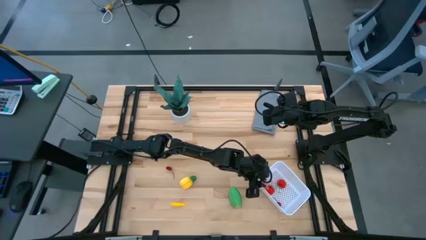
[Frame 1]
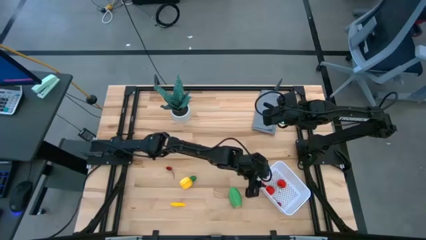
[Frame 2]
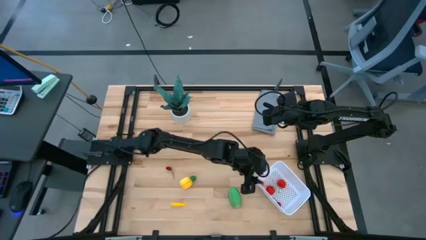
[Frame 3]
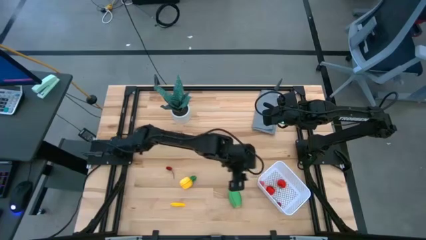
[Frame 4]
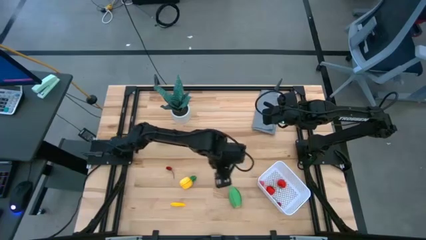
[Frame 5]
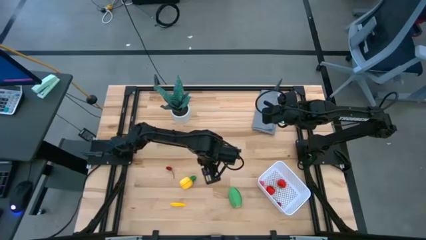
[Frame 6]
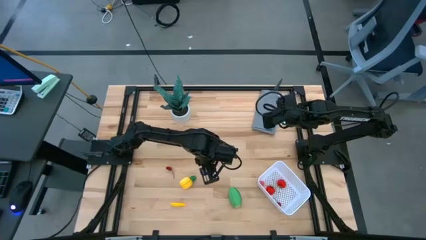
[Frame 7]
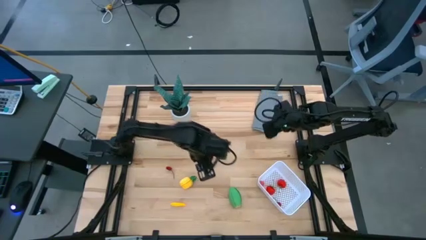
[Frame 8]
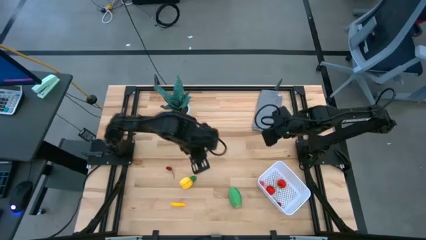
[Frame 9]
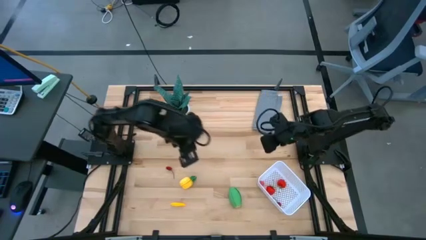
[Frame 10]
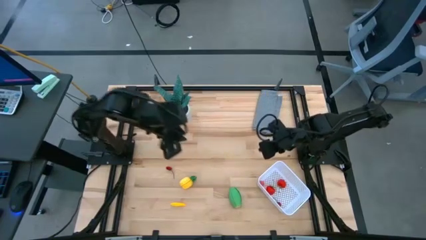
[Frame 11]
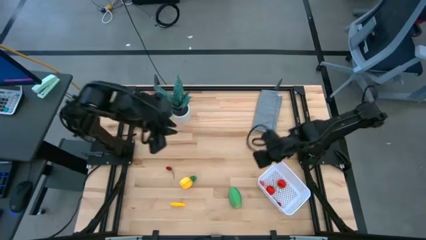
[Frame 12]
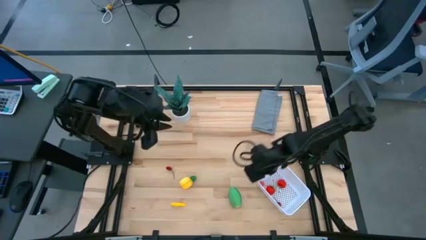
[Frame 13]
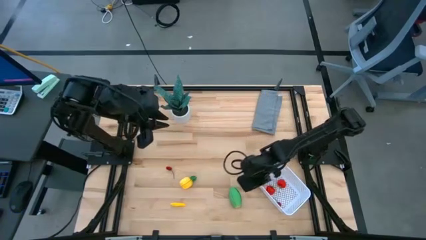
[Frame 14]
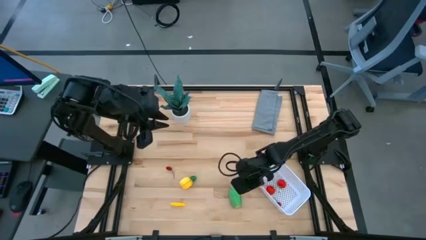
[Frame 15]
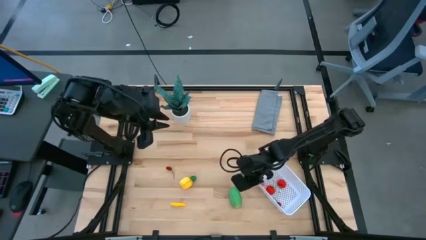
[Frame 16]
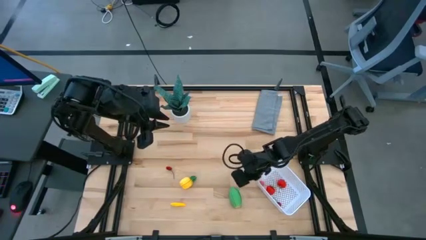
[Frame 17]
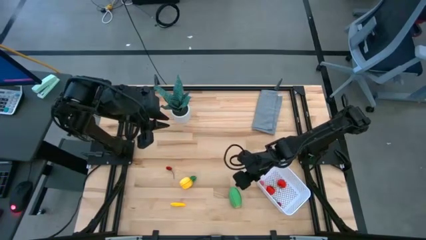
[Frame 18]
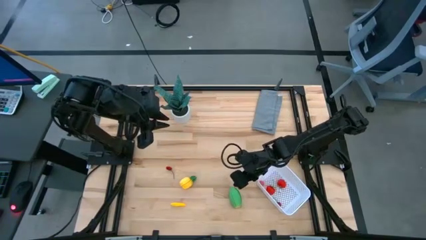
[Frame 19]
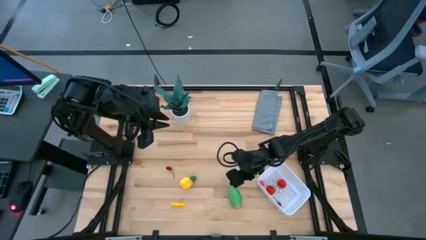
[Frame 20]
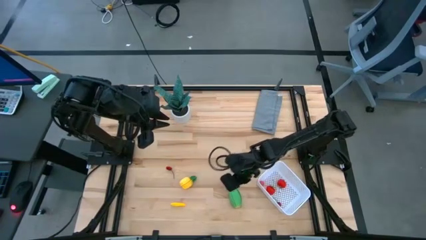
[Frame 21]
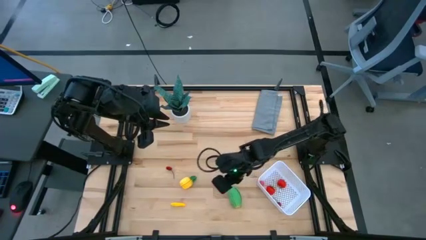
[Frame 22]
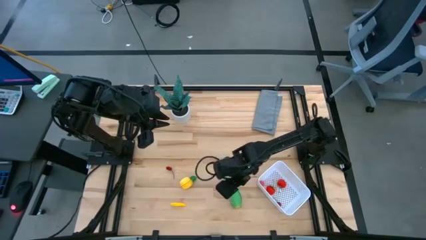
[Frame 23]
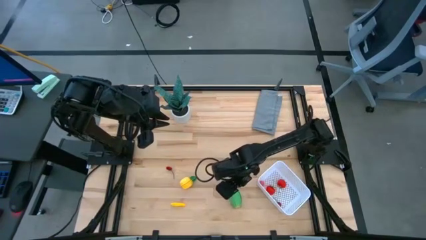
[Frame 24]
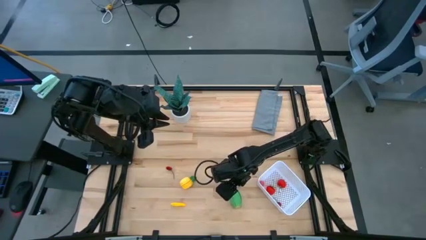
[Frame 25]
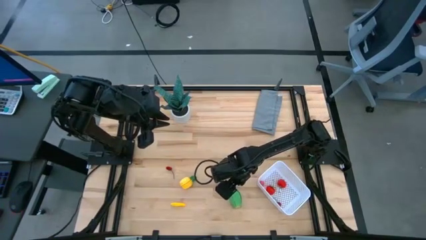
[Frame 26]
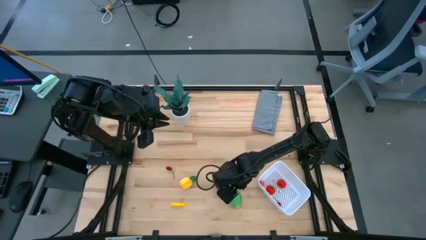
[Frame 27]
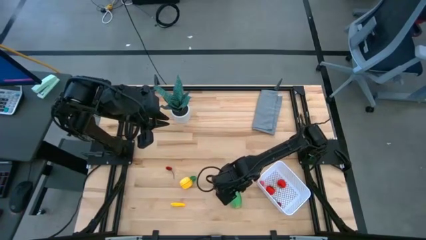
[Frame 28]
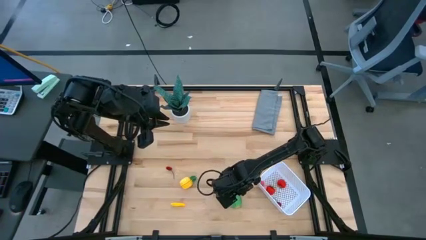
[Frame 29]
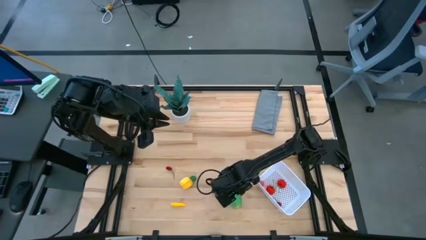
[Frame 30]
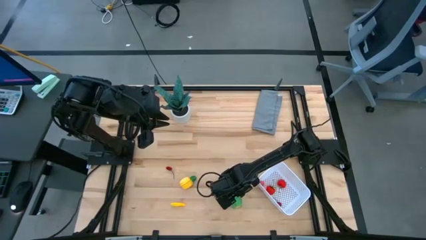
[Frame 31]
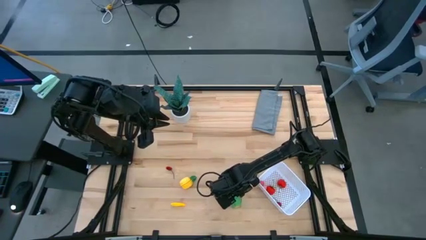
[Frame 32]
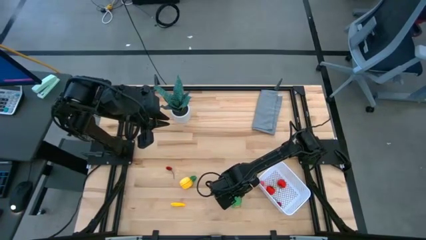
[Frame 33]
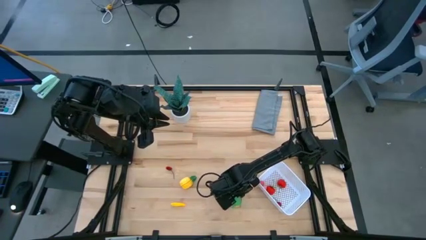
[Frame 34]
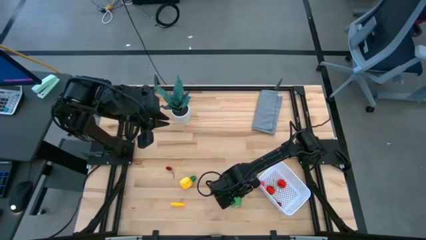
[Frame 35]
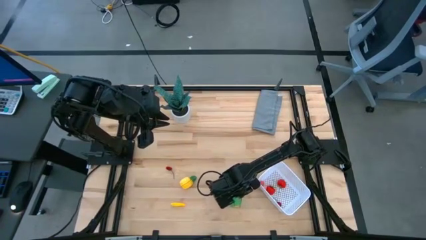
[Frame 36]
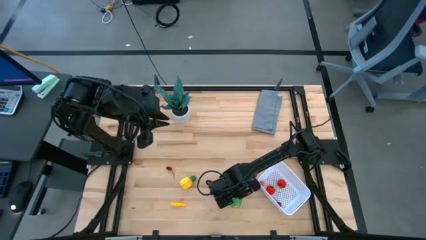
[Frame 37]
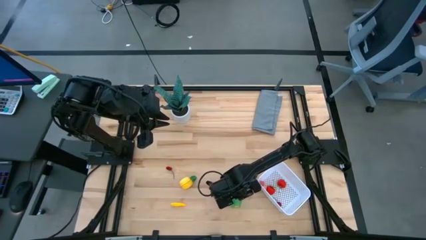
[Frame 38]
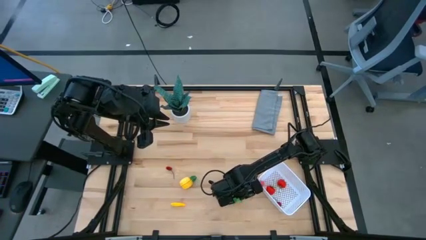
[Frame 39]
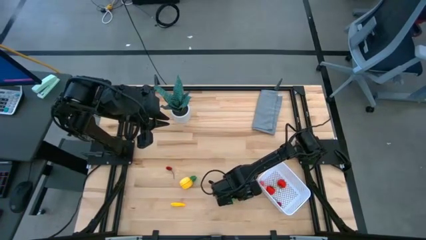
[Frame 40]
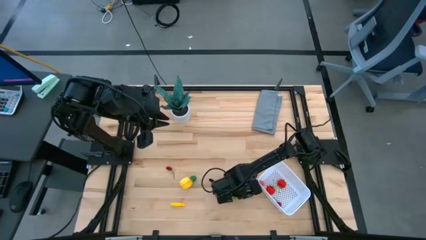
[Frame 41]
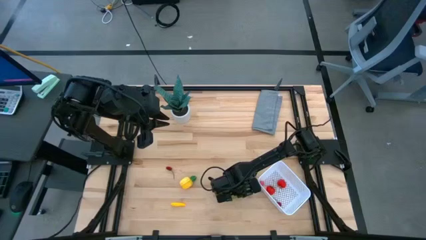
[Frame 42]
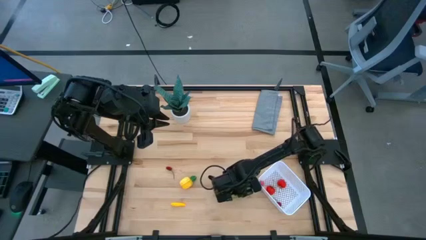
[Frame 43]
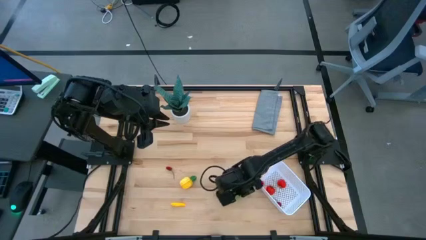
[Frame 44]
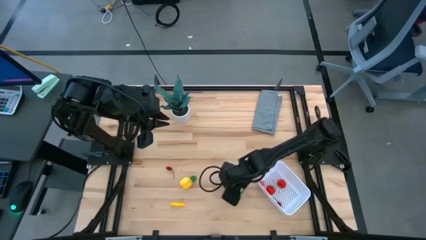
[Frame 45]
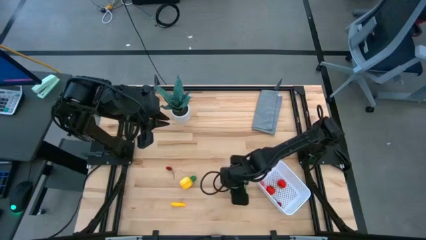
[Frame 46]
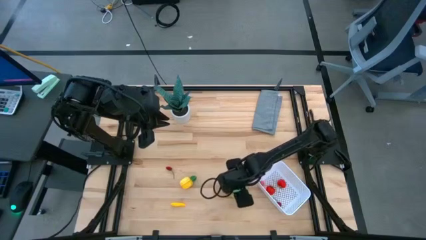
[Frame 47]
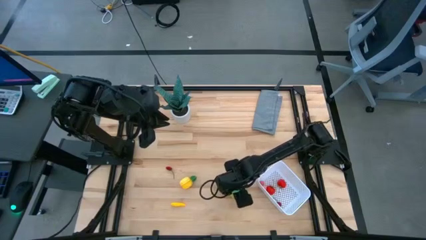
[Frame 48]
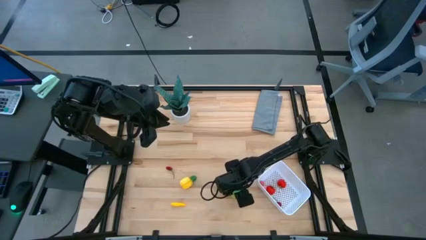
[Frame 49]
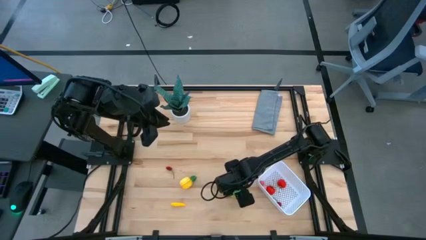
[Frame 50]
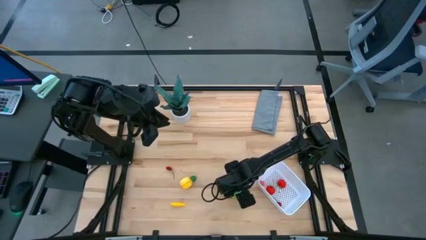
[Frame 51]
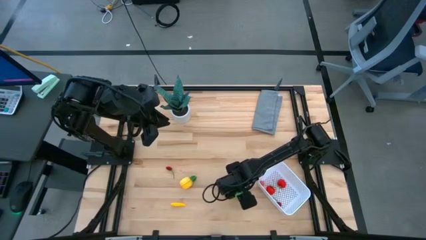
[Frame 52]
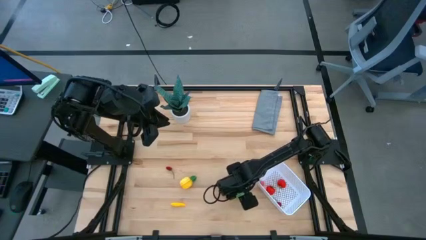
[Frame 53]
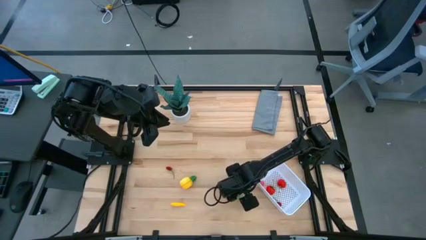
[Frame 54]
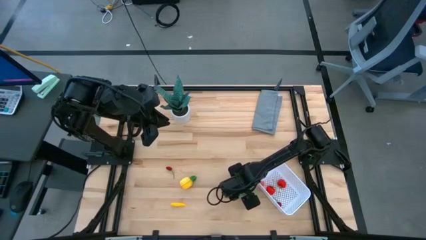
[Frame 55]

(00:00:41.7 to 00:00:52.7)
Task: Pick and placing Produce into tupperware
Put the green corn into the white basket

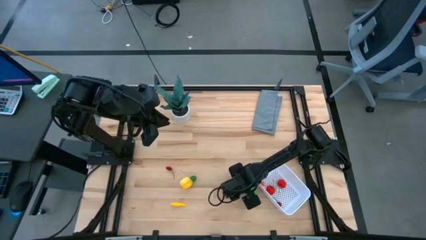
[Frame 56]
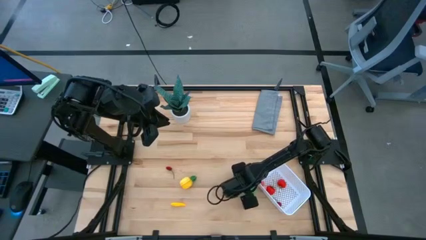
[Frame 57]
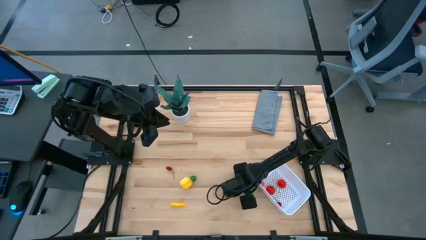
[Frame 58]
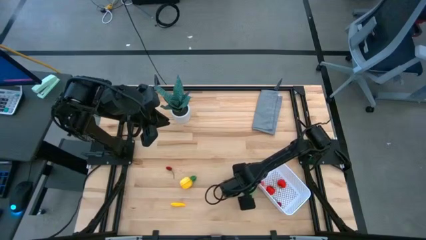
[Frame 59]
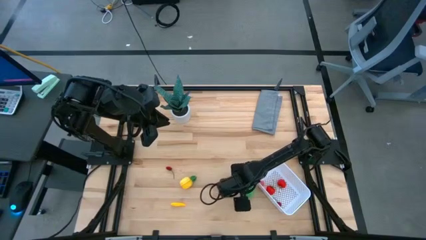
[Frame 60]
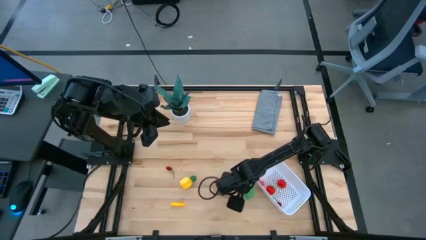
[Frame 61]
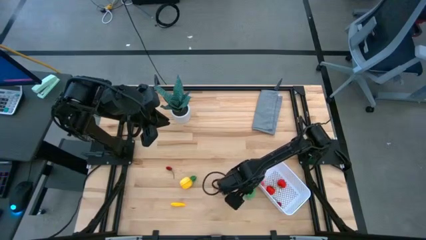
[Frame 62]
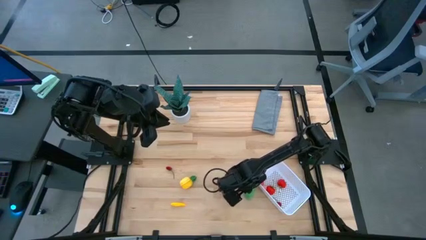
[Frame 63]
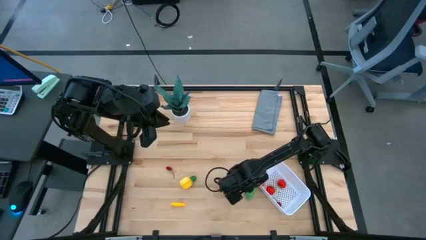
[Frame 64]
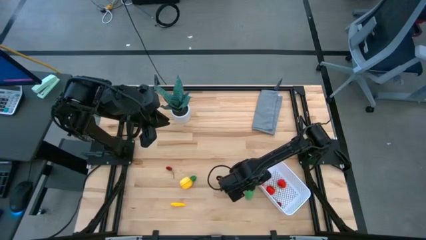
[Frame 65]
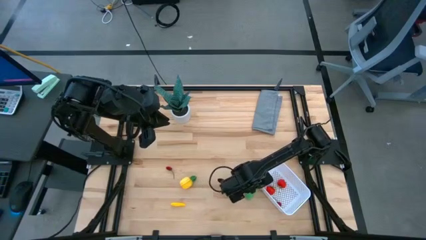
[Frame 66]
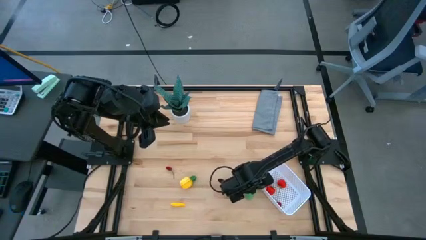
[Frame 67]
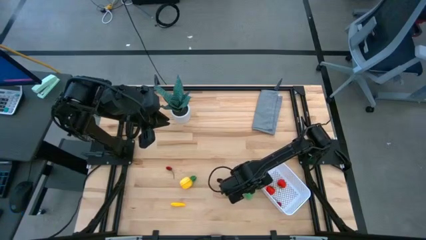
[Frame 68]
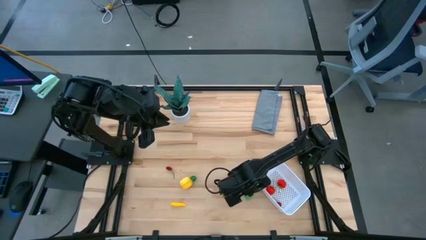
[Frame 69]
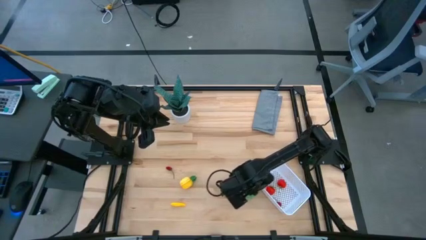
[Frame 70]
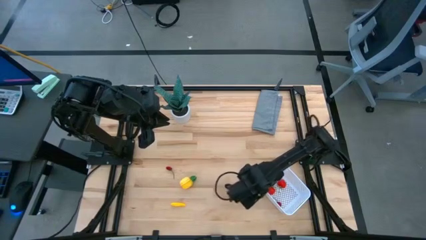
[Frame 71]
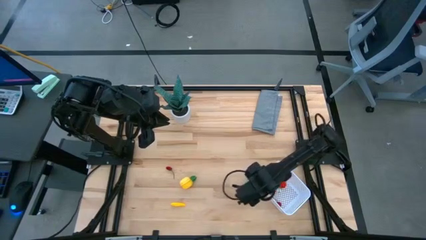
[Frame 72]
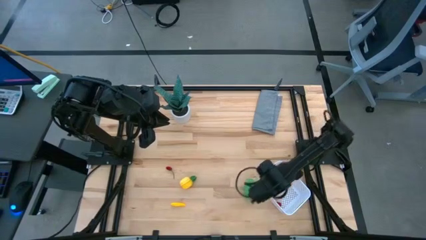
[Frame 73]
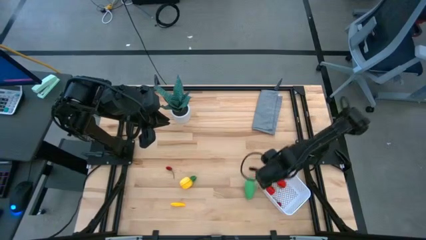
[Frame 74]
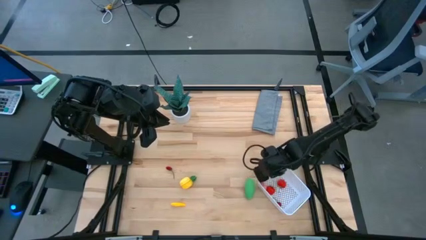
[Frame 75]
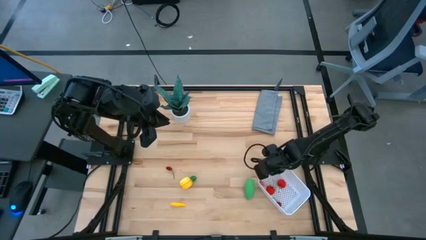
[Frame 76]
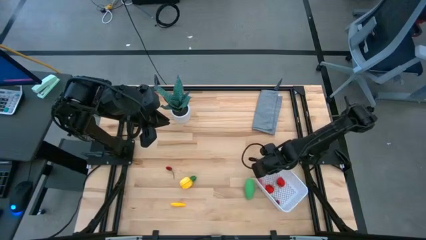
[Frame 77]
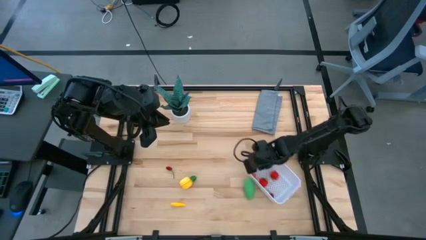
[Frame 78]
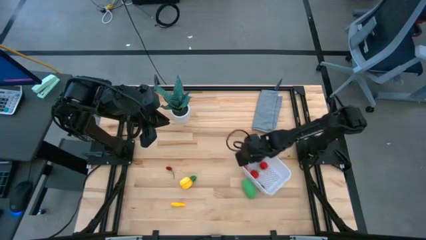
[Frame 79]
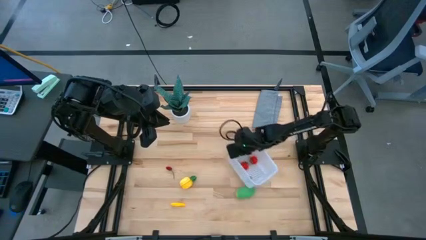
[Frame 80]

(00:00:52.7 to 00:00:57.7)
Adjust the white basket on the table
